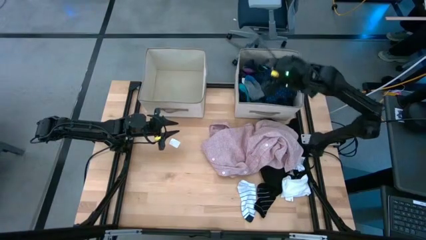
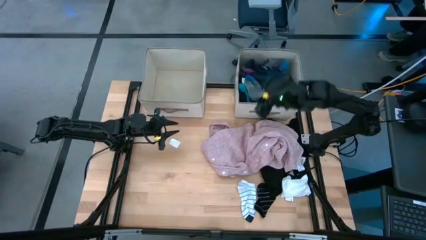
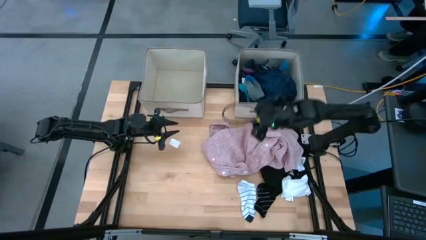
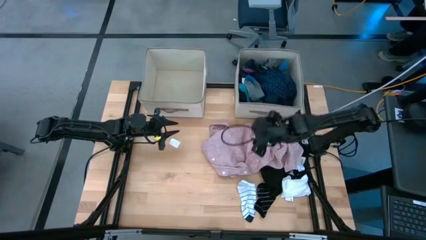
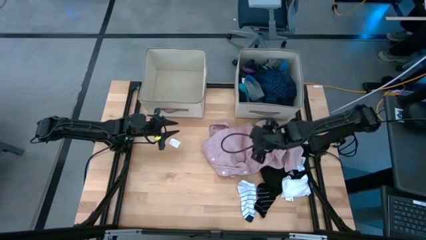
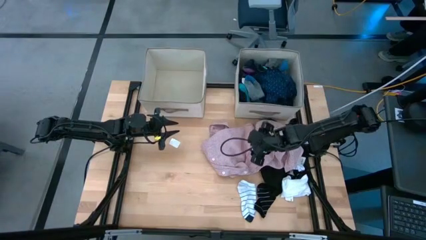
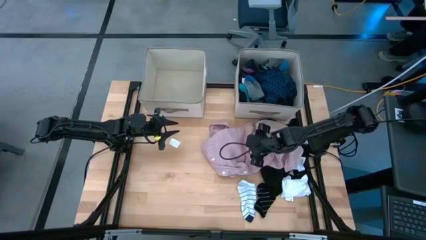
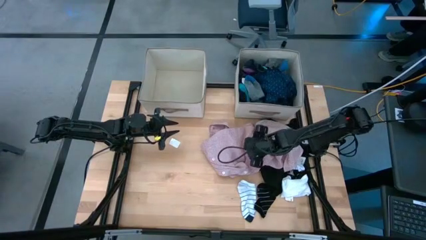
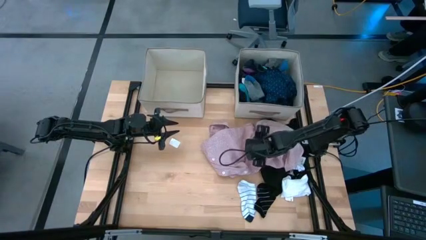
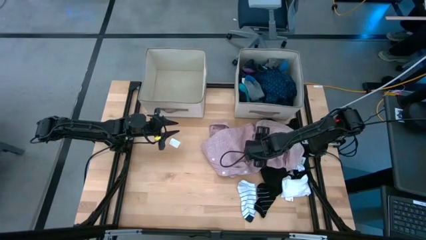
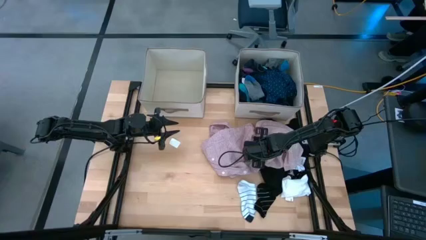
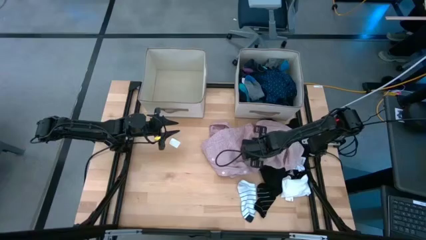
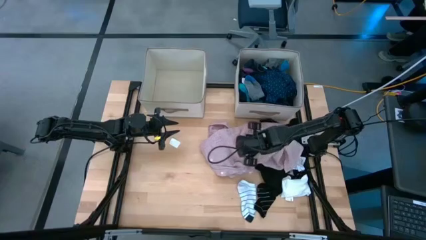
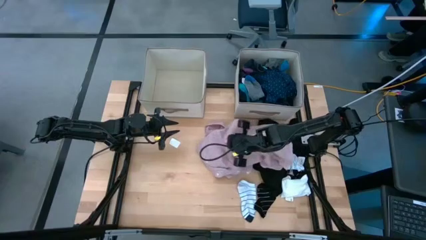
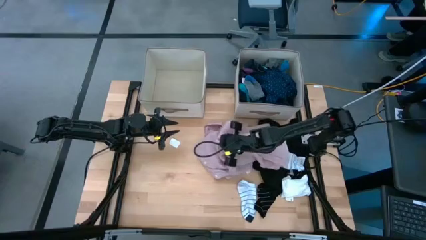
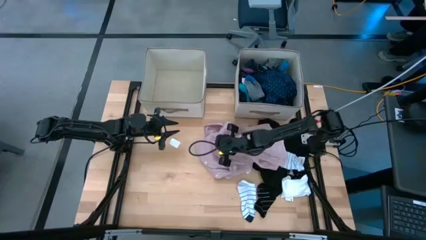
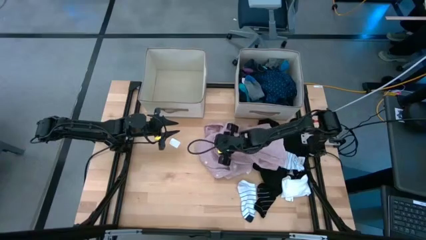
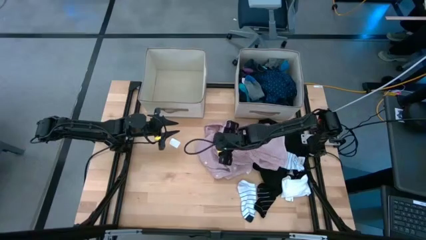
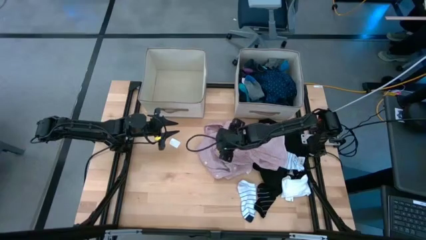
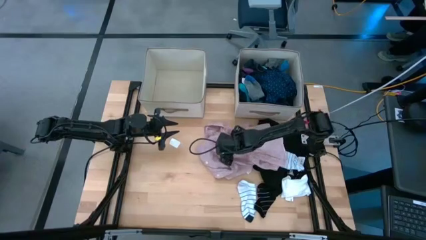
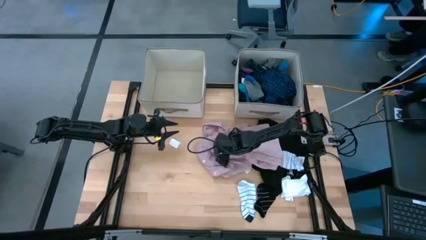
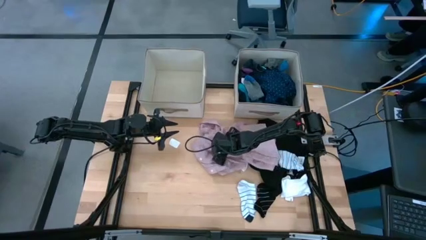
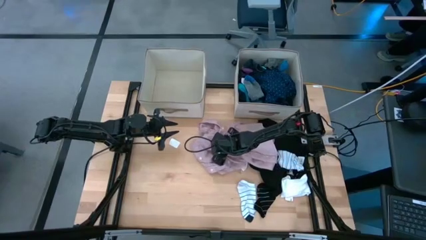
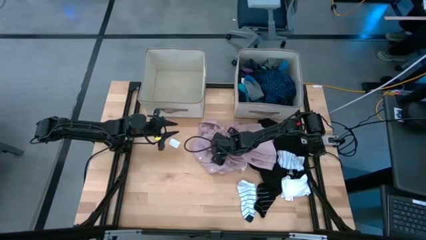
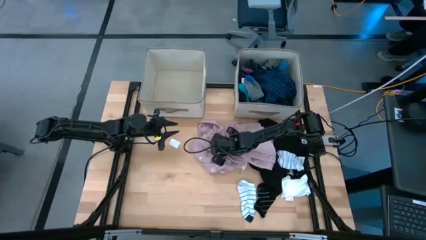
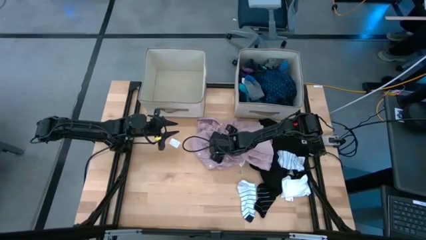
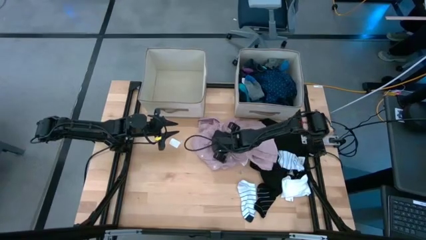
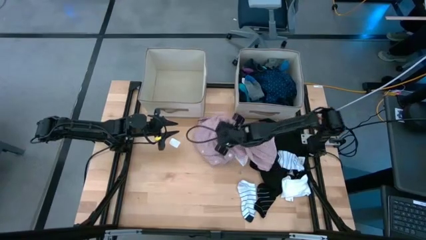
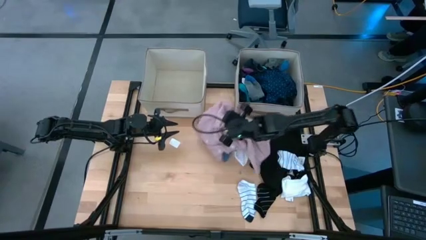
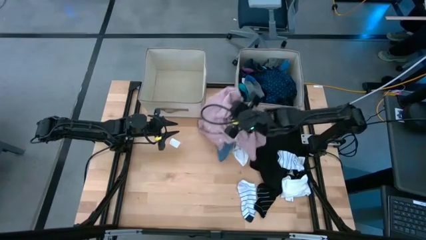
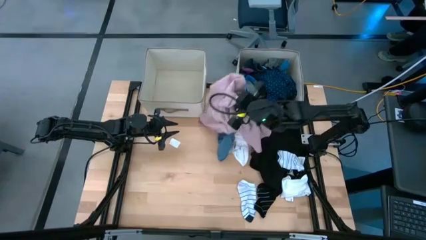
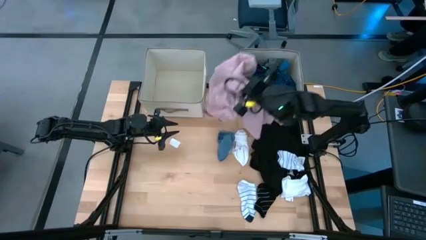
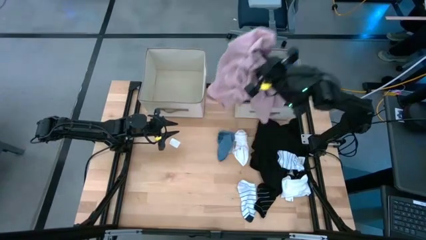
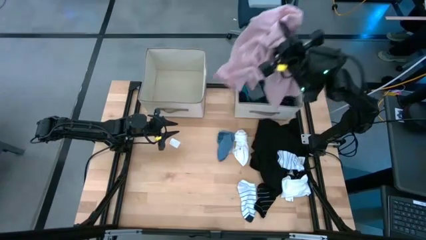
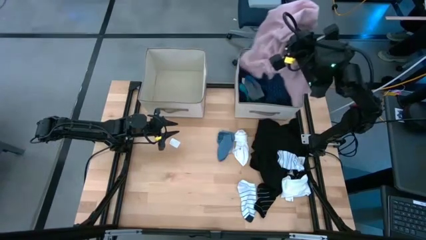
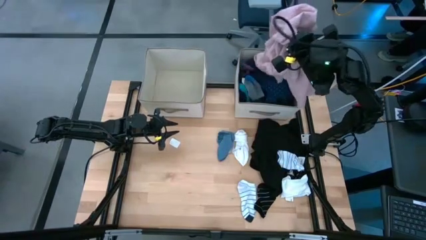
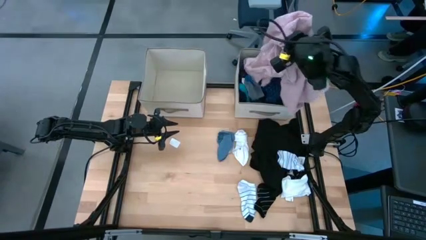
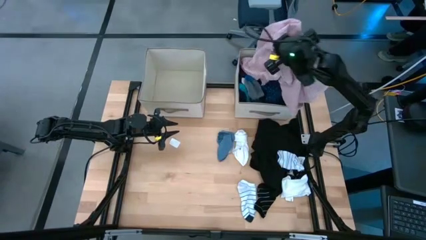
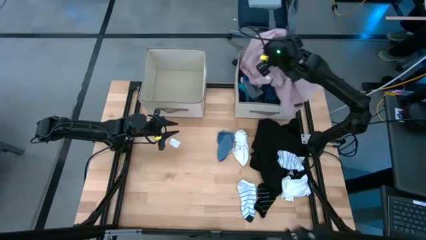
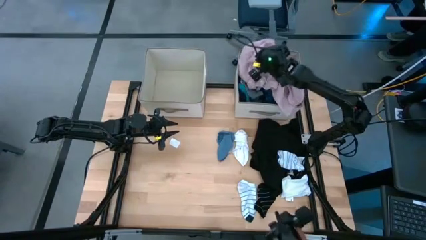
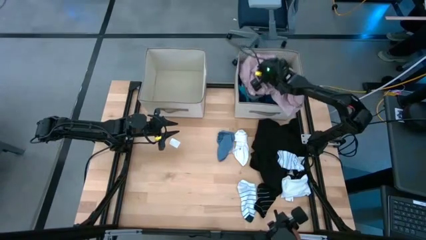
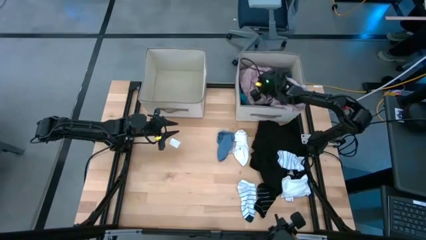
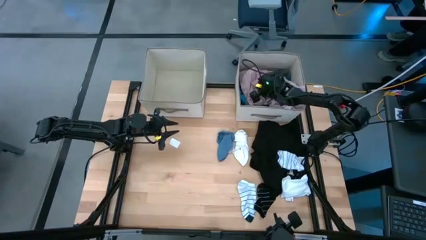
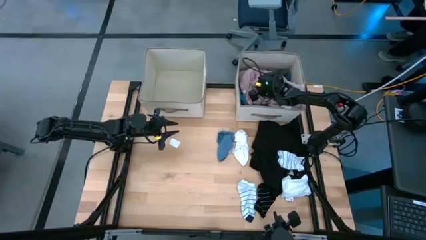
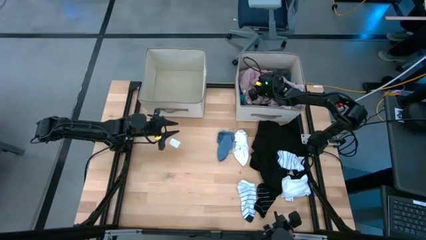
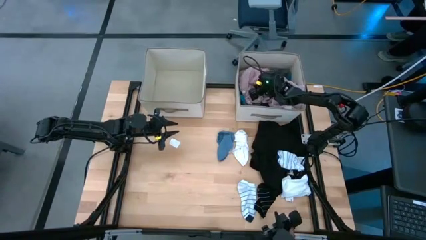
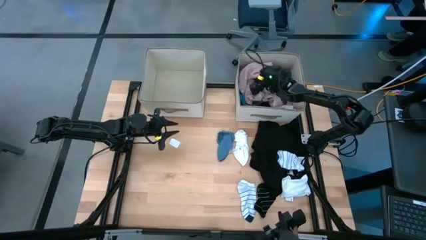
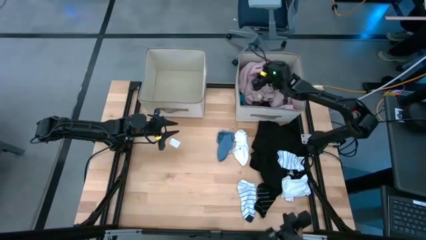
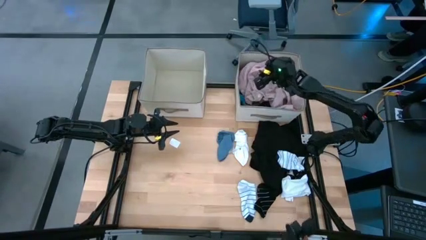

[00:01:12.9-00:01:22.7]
Task: Sort clothes
Put the pink shirt into the right laundry organizer

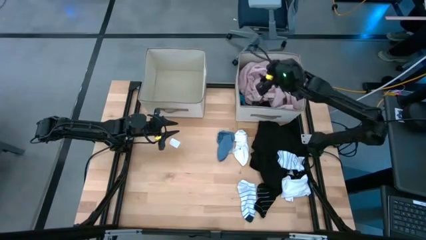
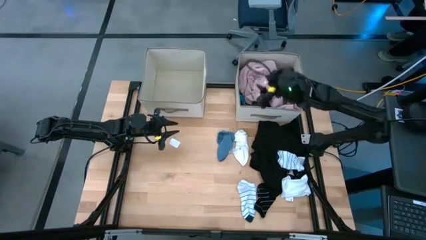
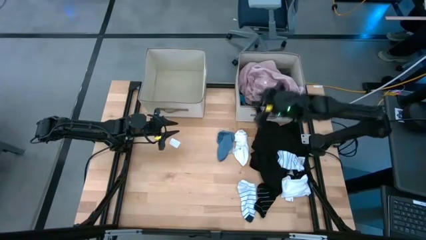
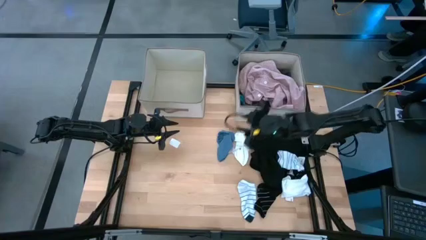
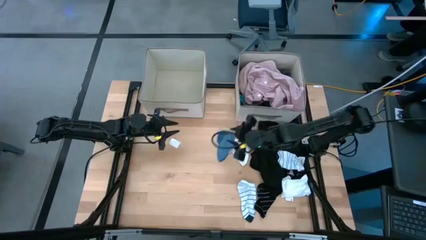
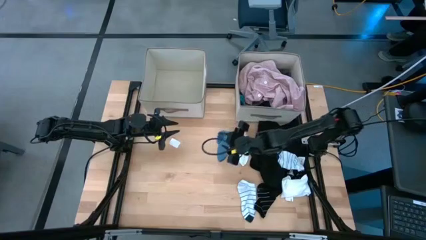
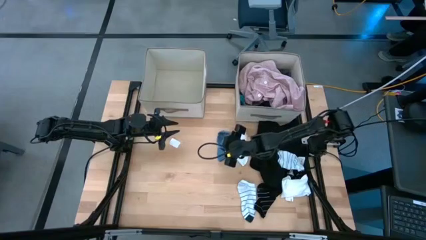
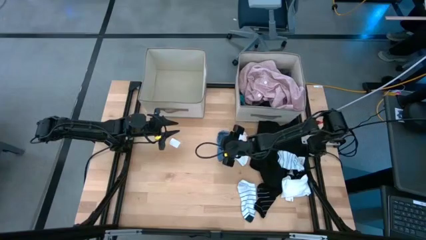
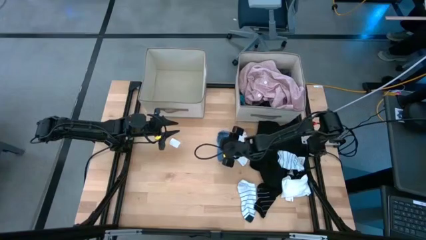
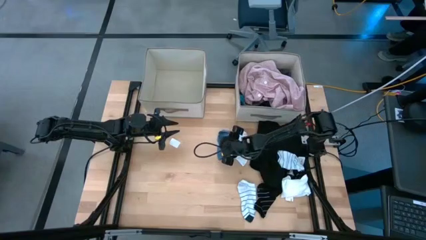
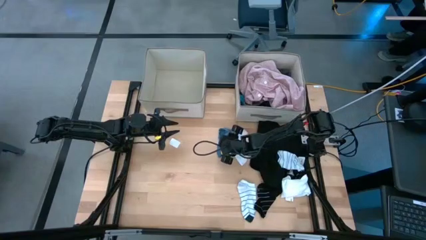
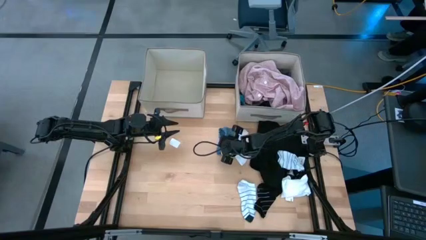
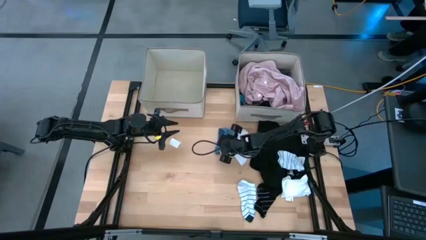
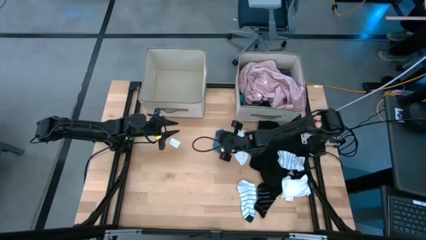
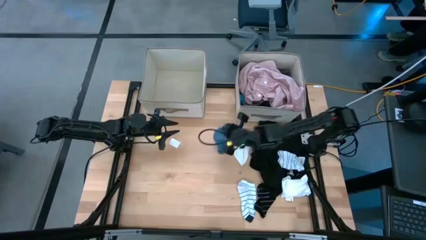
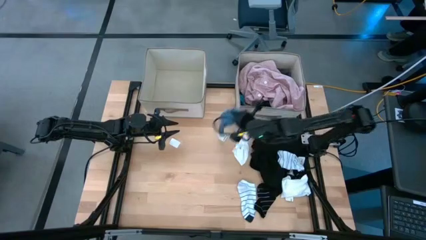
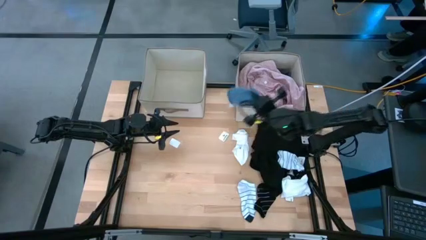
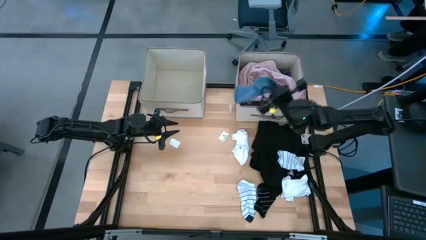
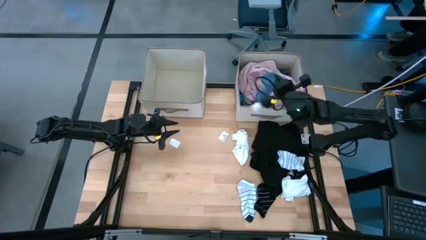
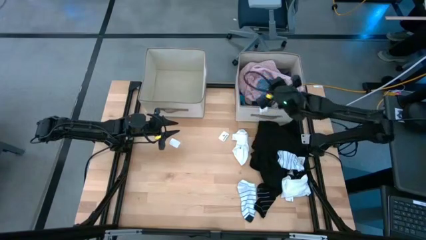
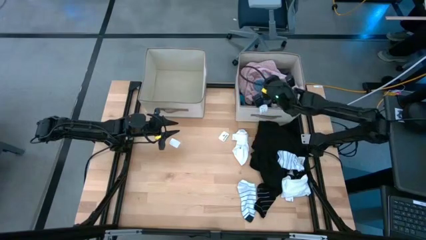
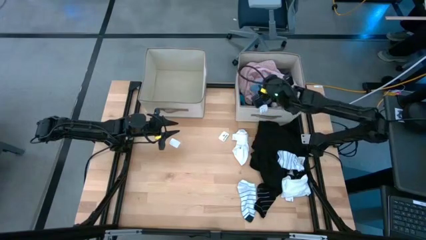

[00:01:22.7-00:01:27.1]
Put the blue sock into the right laundry organizer

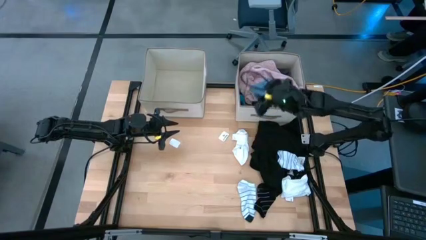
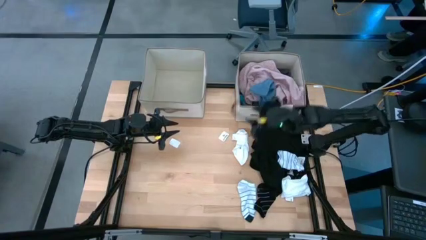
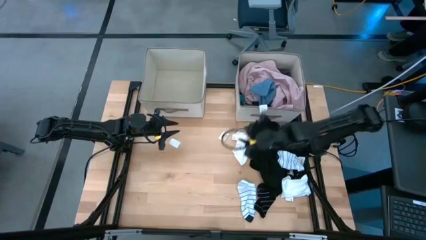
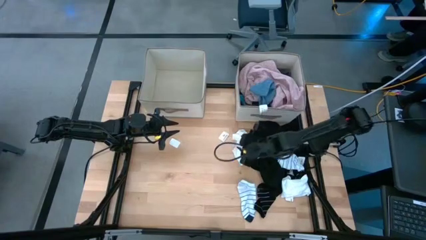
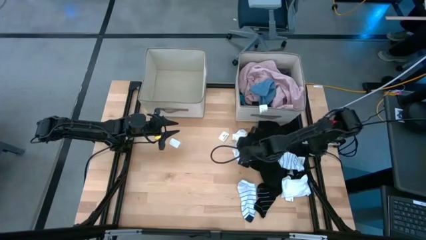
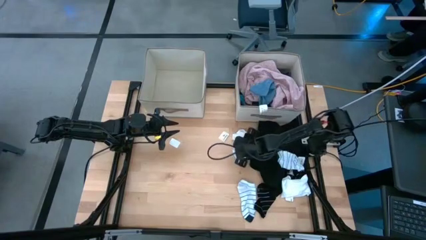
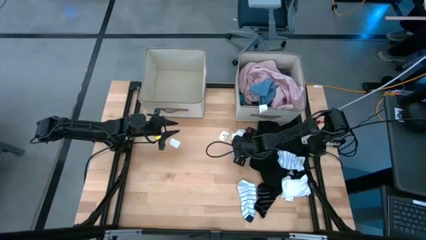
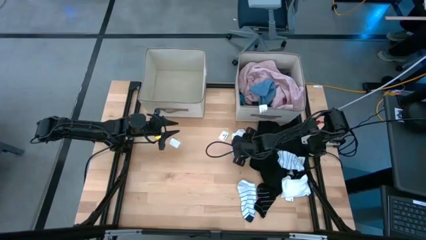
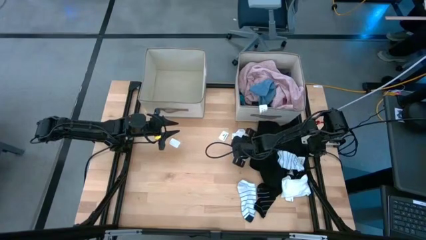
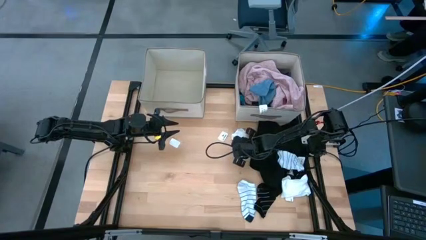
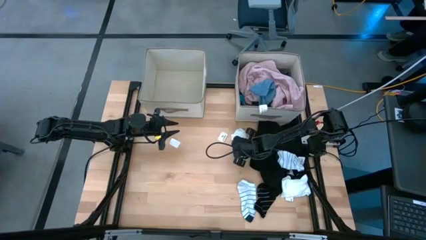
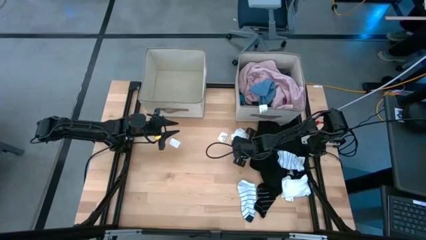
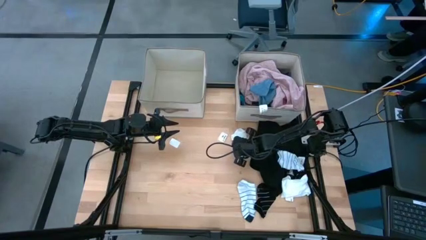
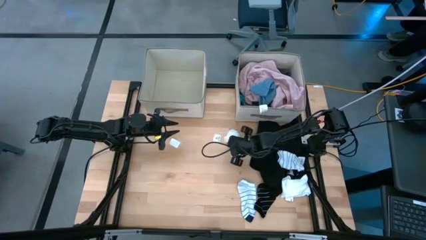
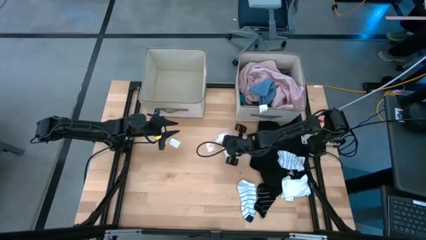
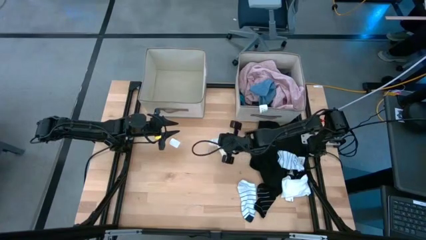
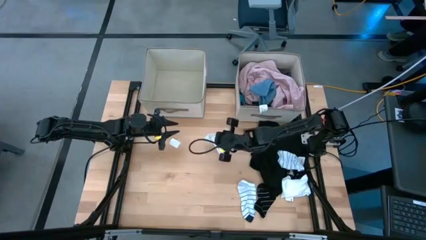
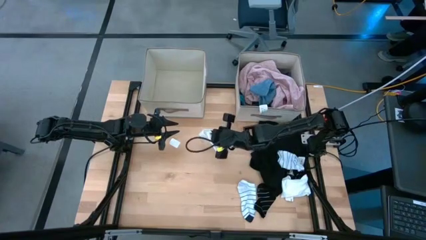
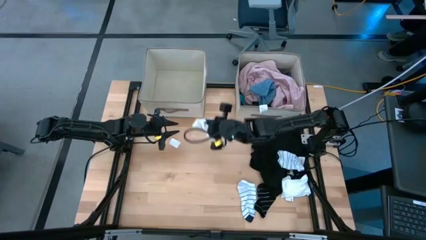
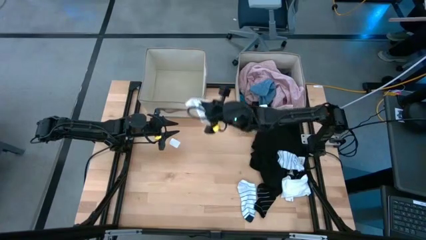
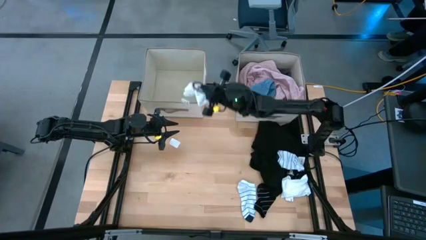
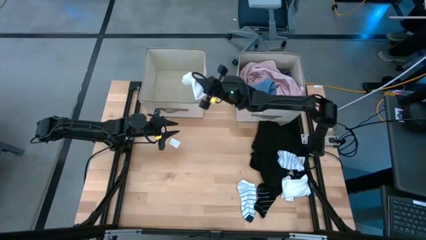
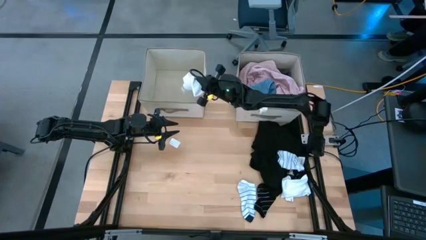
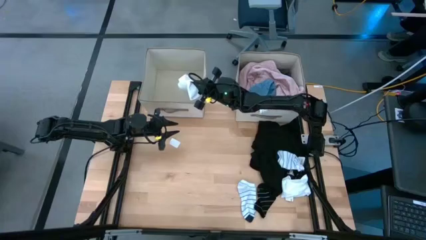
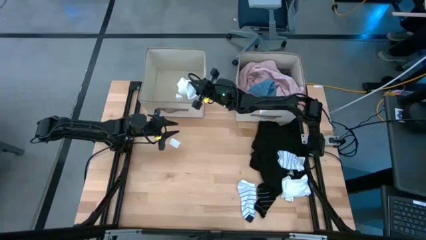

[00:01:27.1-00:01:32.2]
Put the left white sock into the left laundry organizer
